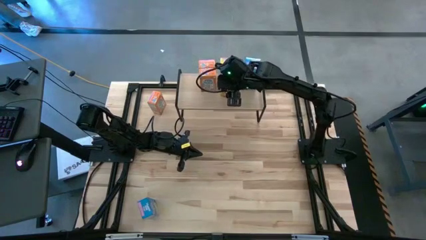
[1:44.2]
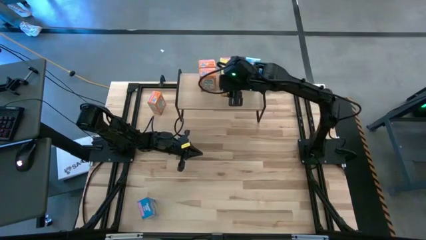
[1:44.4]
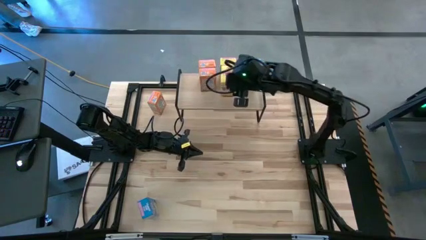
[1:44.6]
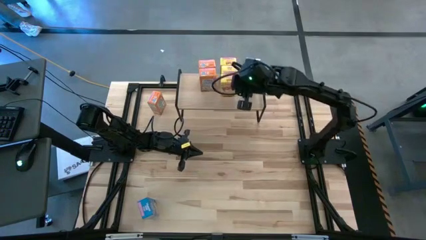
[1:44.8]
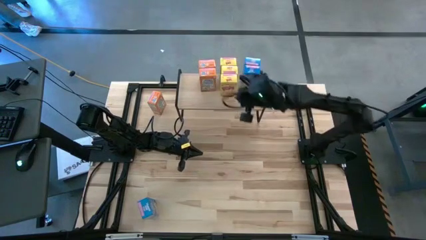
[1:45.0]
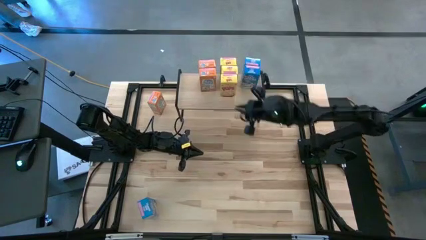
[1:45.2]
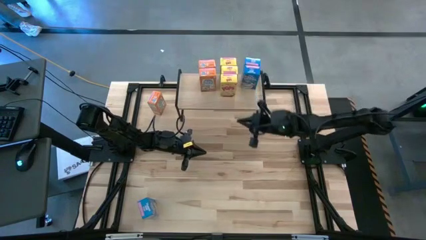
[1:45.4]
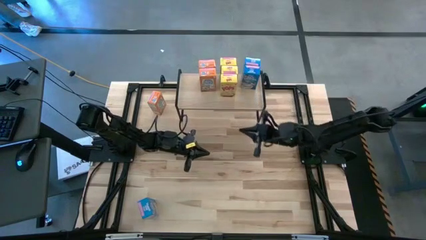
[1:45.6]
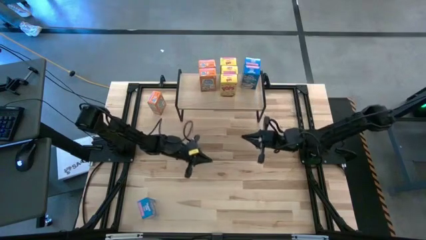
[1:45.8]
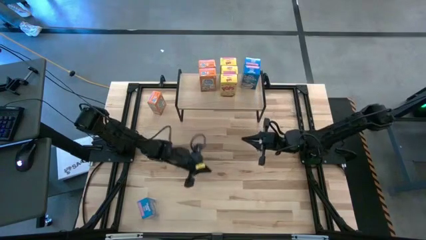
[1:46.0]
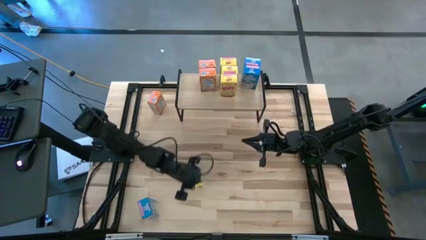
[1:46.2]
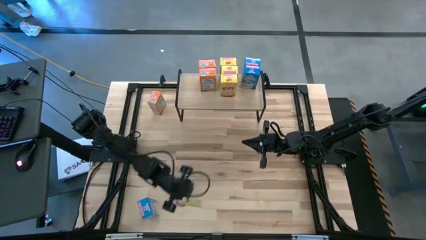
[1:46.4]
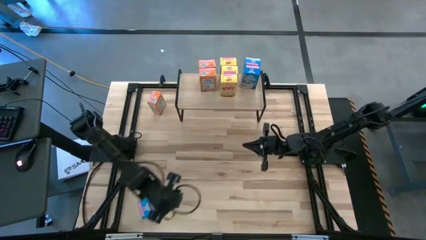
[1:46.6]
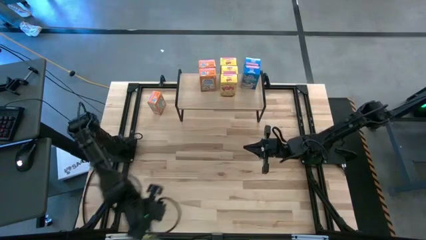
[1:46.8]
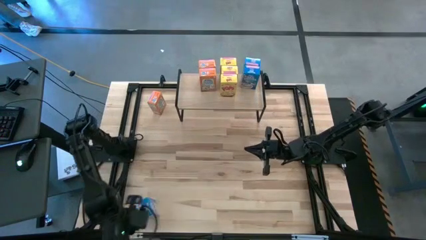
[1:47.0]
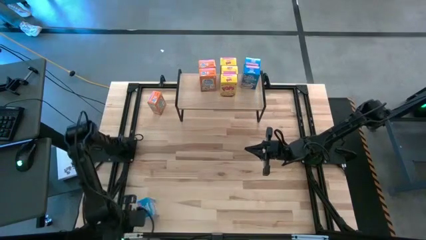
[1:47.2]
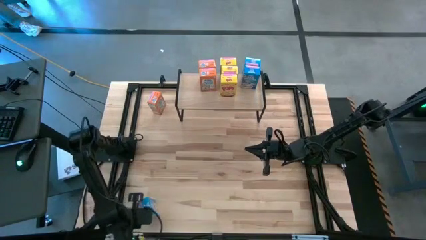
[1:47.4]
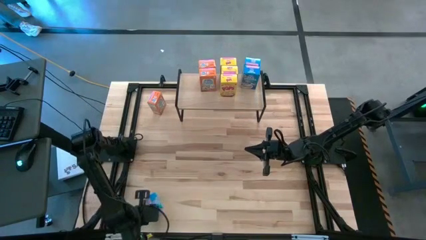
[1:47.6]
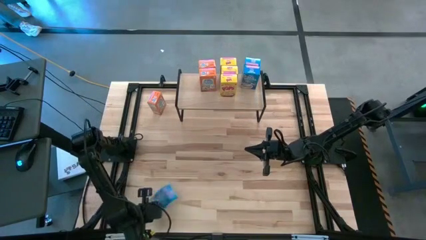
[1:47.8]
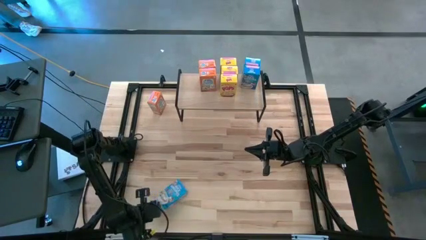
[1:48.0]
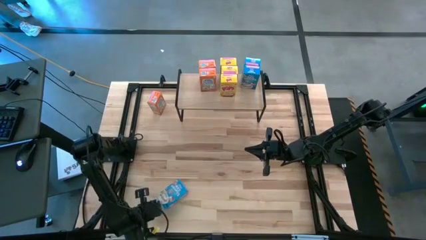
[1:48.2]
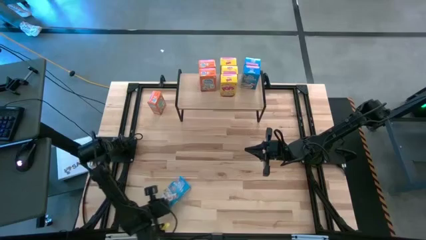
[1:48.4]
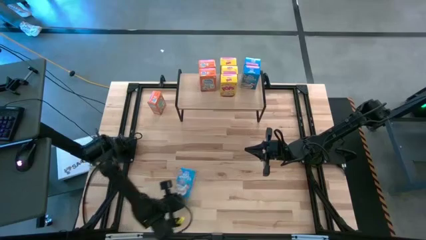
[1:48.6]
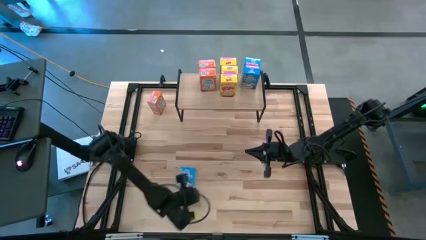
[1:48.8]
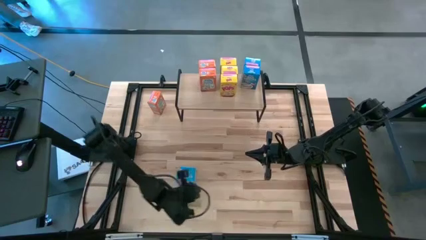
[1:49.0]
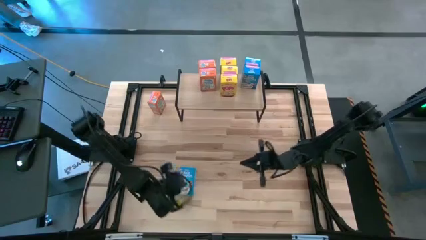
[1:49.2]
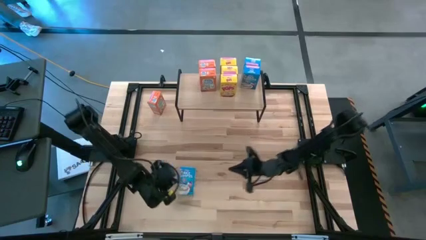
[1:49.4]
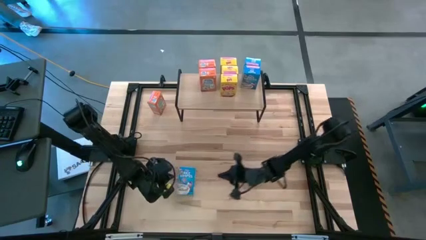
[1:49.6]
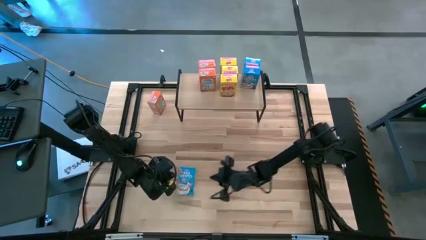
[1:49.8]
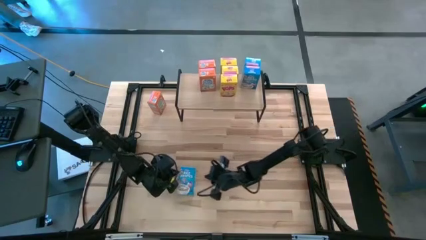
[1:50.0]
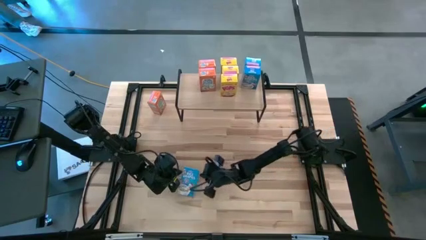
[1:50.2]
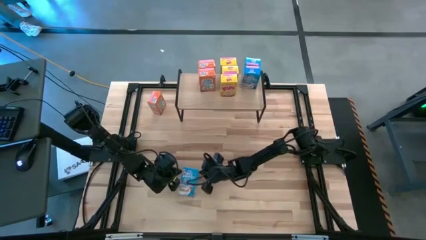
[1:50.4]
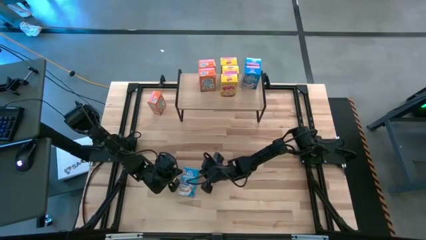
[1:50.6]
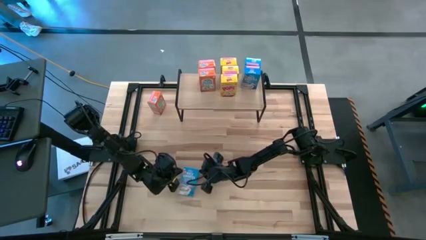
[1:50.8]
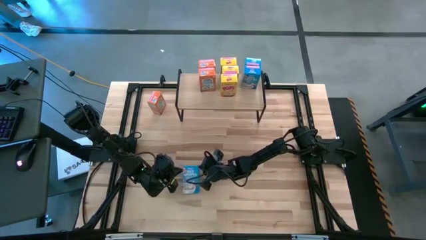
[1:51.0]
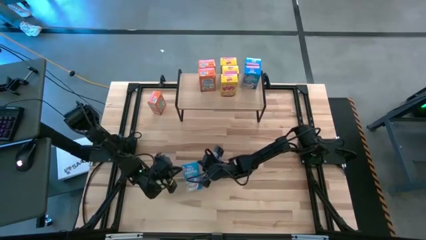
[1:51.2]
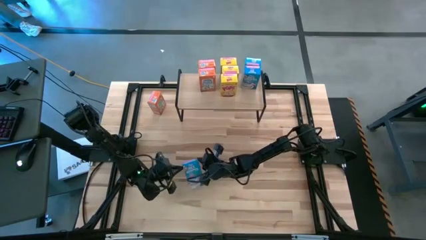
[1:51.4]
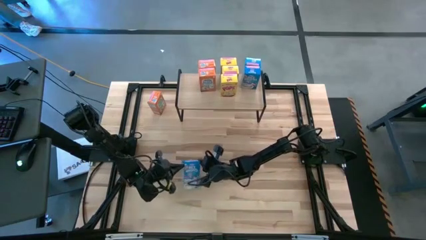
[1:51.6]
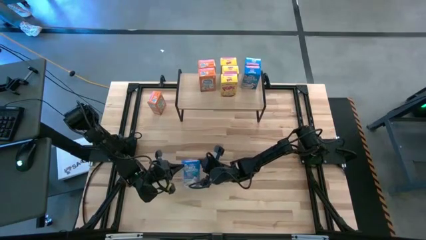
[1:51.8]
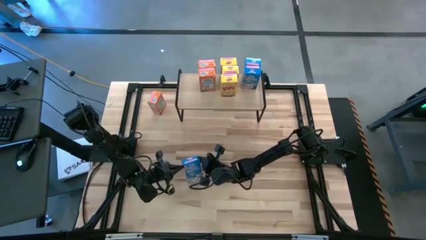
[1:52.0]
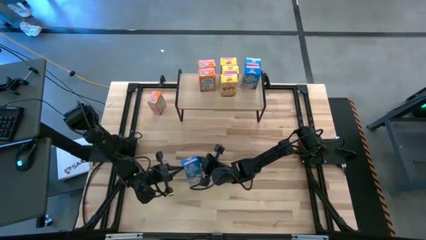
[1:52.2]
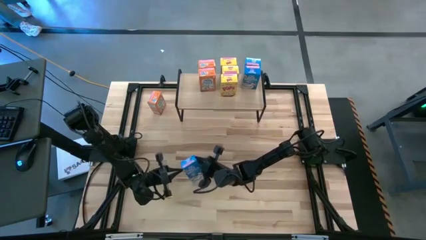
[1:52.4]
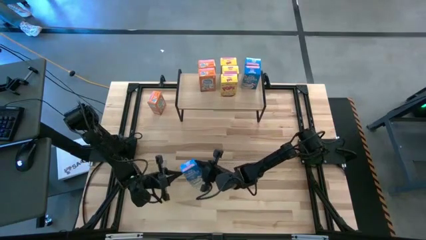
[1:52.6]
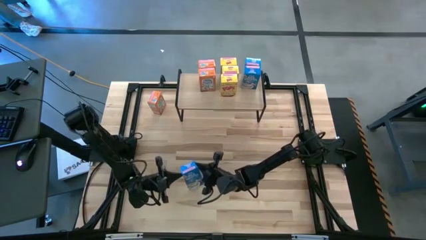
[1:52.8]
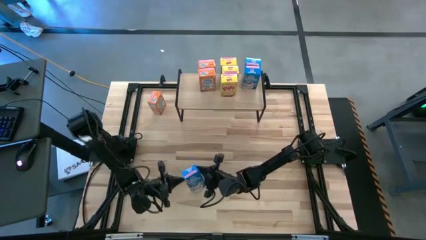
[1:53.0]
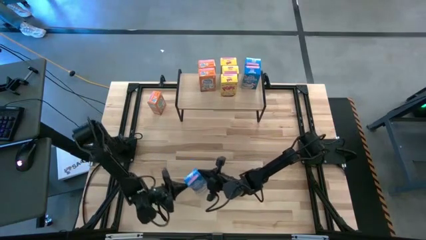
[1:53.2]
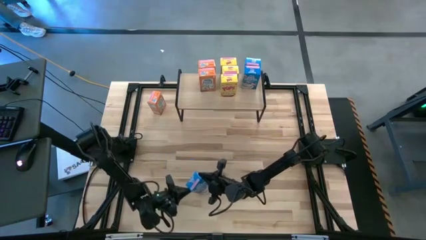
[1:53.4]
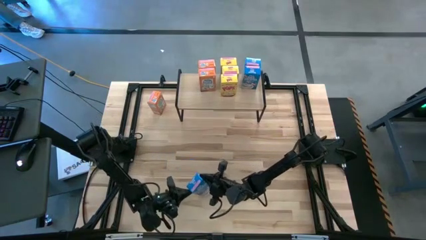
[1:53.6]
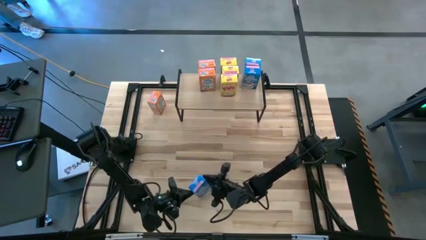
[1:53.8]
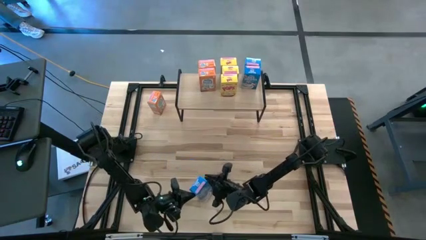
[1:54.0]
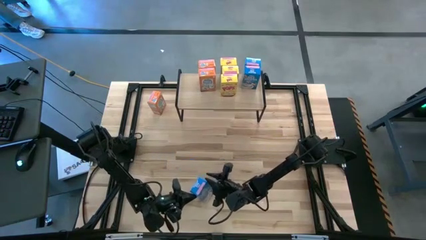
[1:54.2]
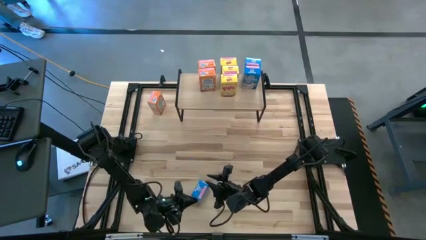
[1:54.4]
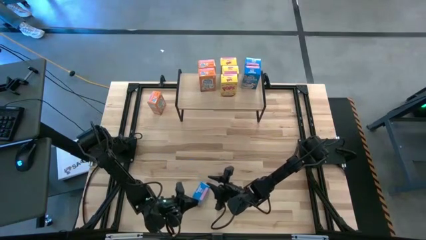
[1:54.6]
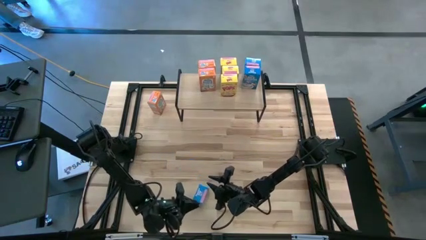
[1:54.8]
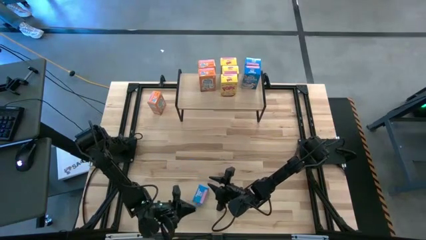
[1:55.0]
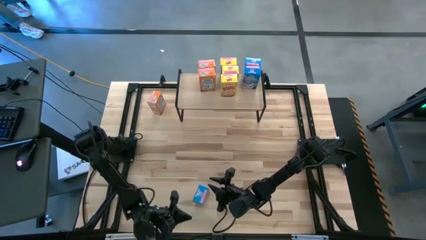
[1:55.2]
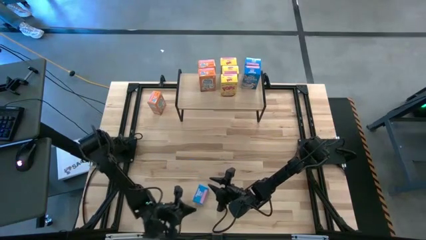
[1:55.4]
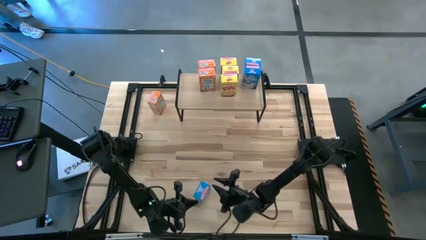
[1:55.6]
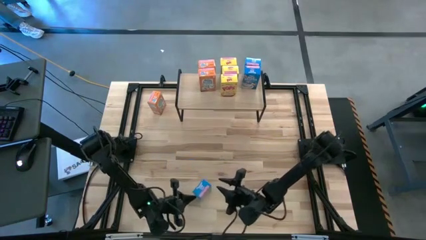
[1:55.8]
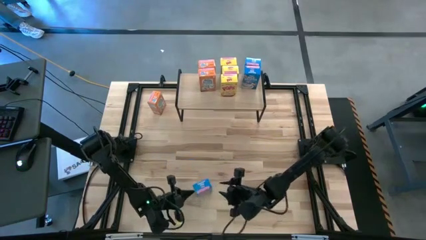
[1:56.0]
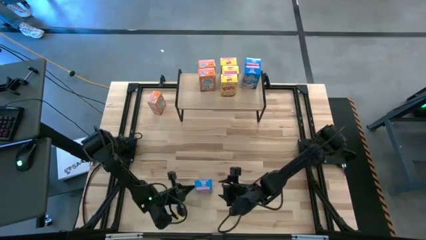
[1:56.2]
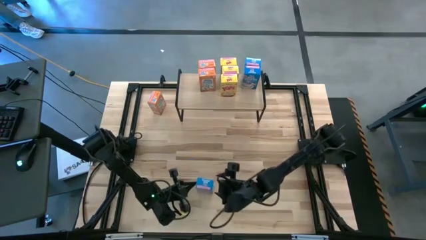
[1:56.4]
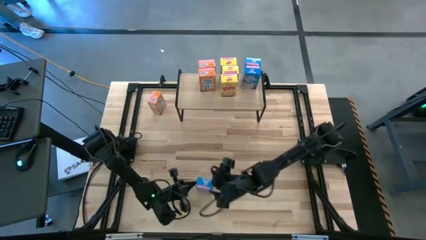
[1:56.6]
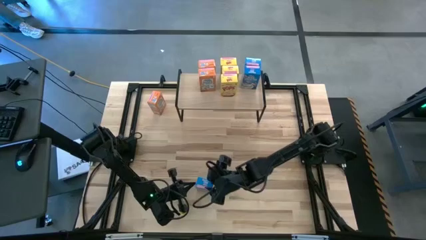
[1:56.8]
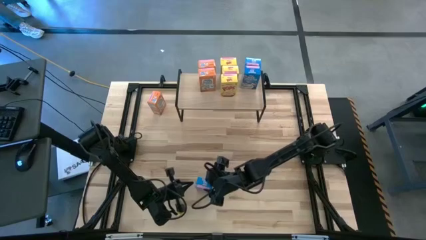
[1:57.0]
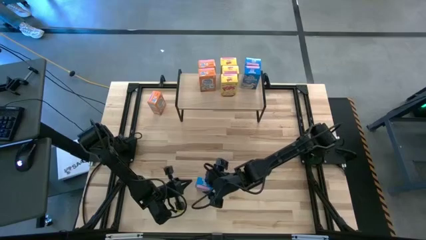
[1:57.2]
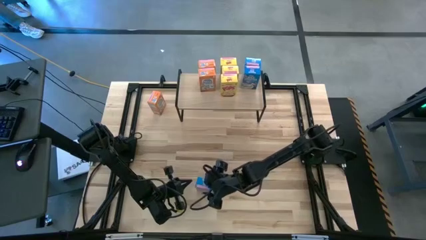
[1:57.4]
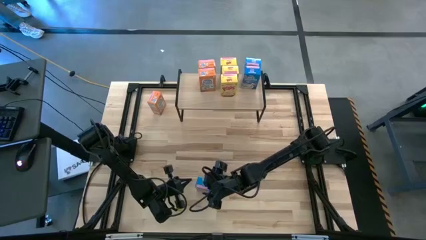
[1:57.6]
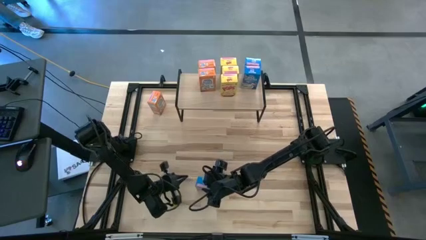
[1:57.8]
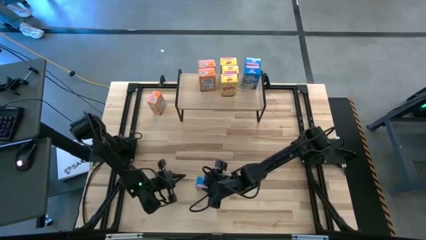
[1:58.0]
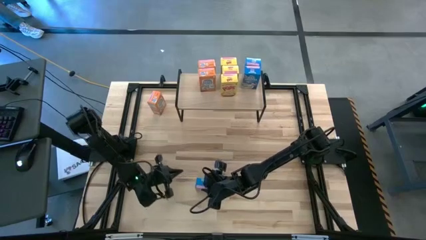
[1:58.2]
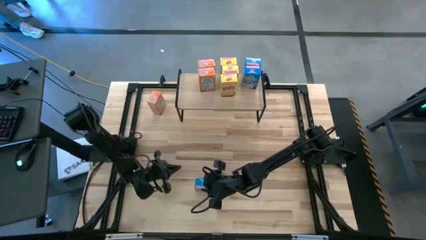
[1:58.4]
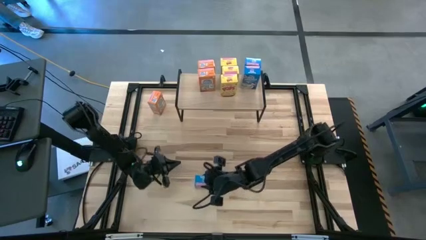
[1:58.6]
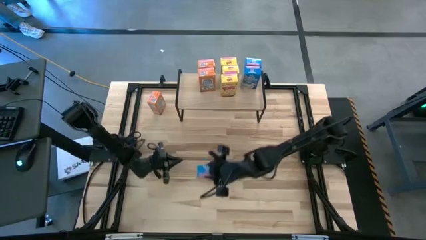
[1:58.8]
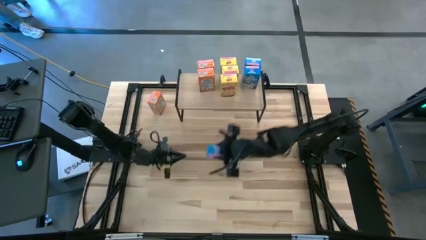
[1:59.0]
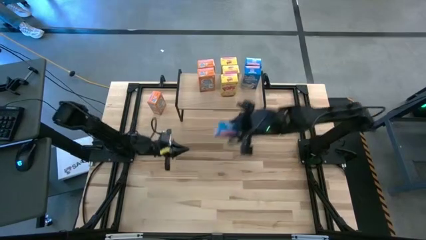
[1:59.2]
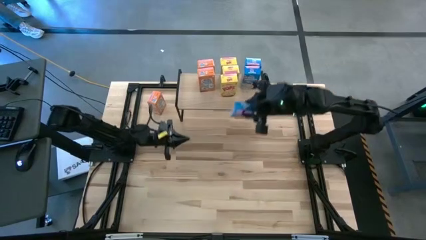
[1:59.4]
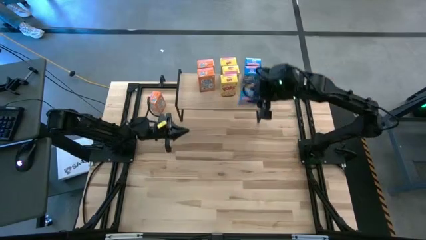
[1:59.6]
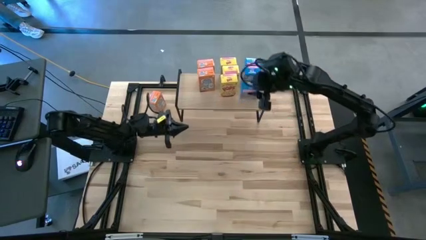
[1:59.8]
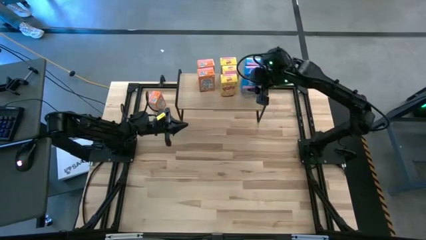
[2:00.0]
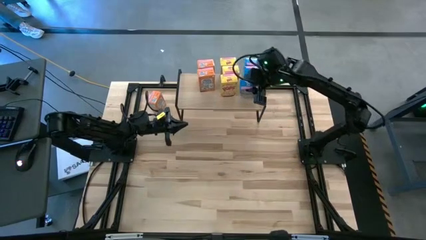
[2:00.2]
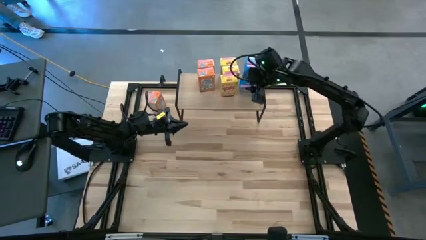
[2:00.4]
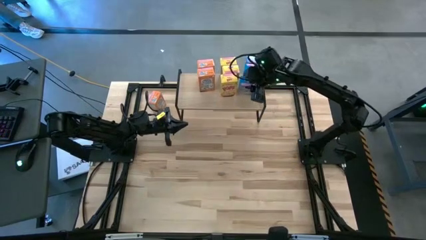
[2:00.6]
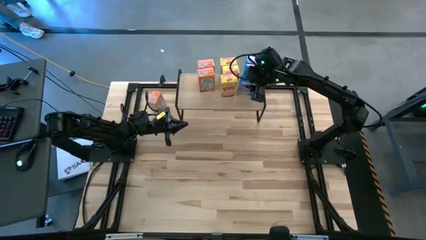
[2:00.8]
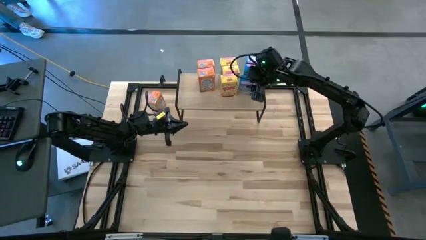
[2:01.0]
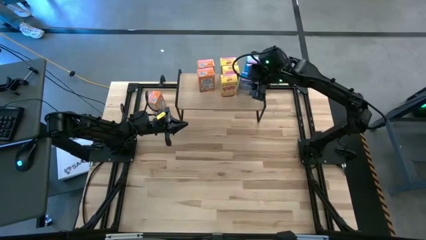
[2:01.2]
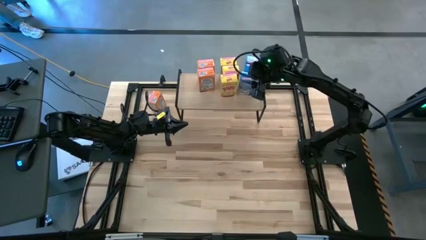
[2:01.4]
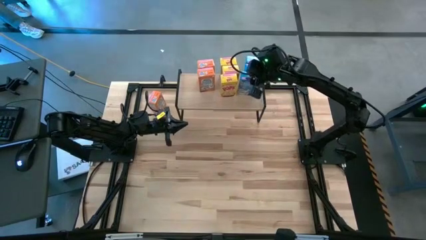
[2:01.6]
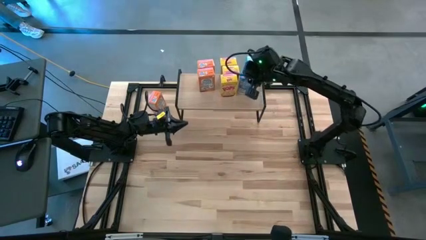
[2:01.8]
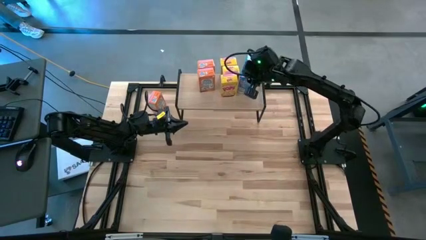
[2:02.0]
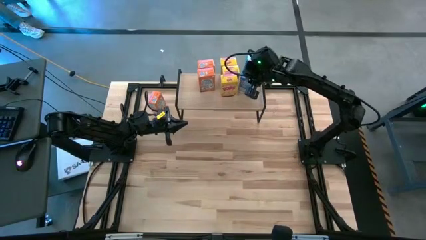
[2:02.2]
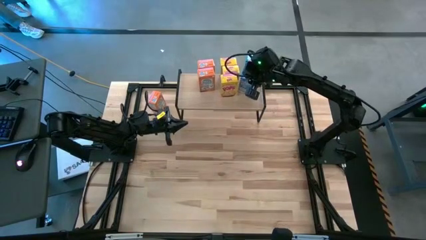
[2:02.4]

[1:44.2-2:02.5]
Task: Stack cereal on shelf
Put the blue cereal box on the shelf aligned with the other blue cereal box
